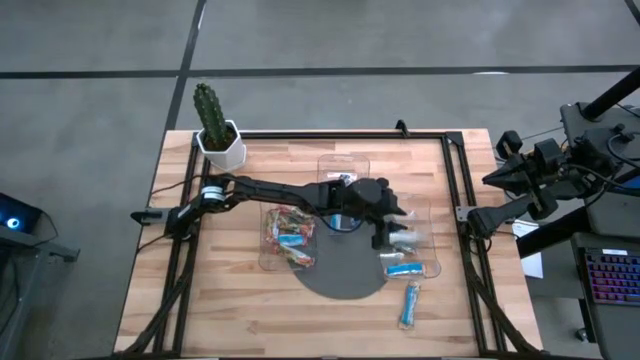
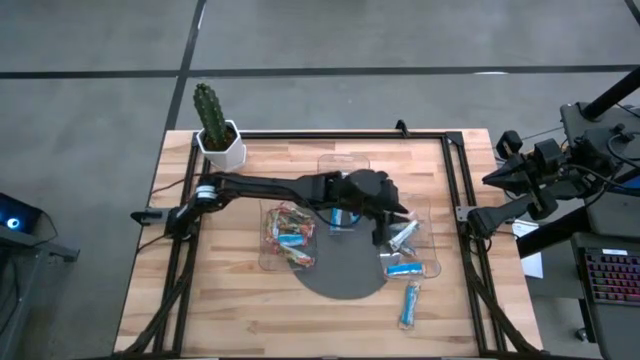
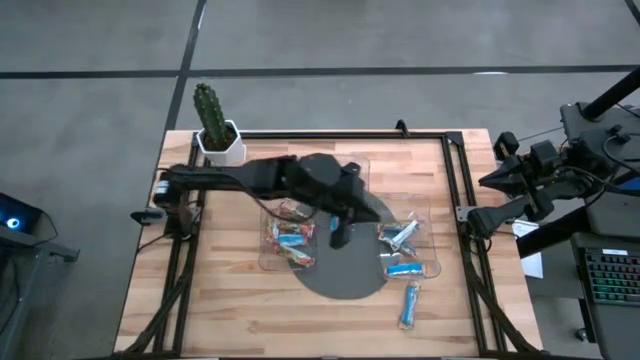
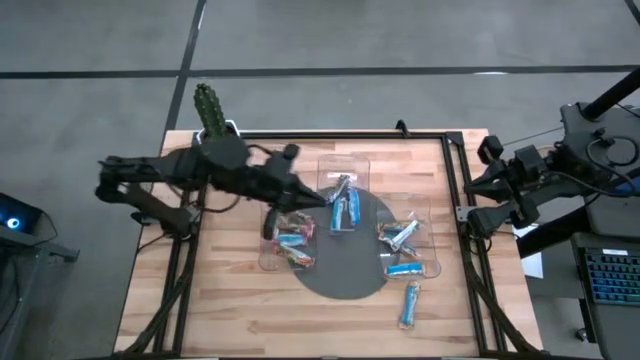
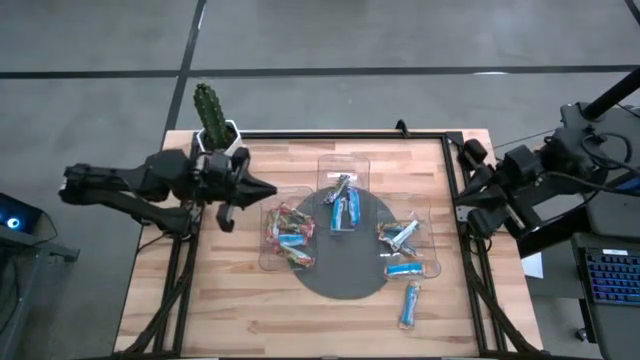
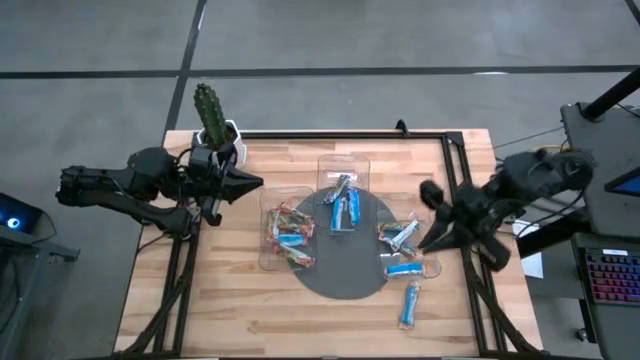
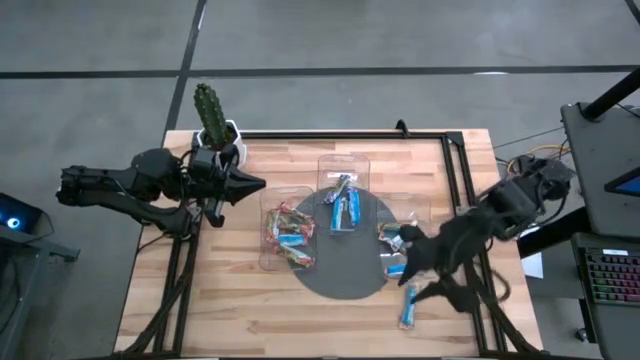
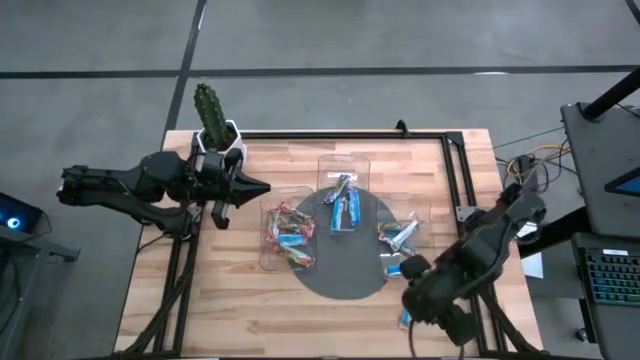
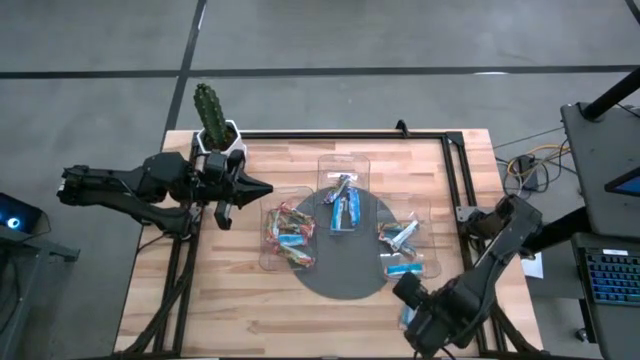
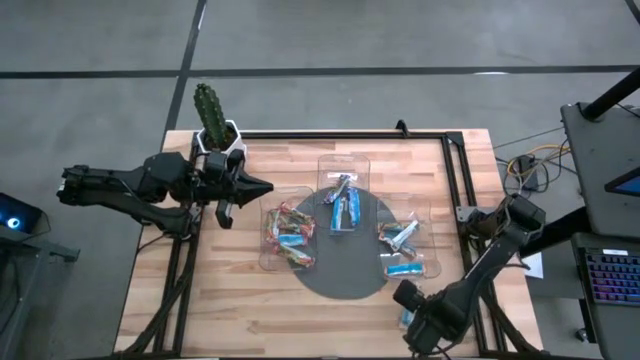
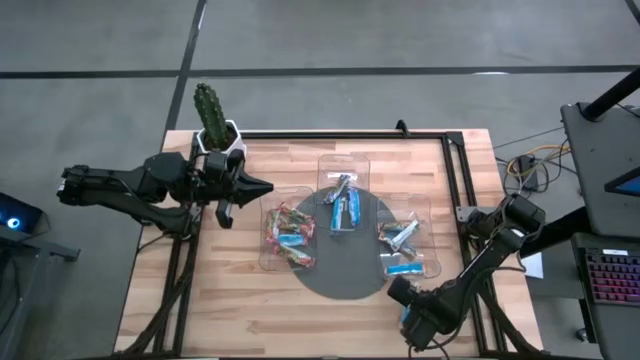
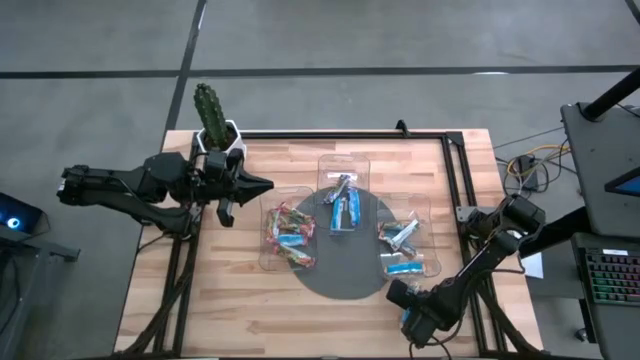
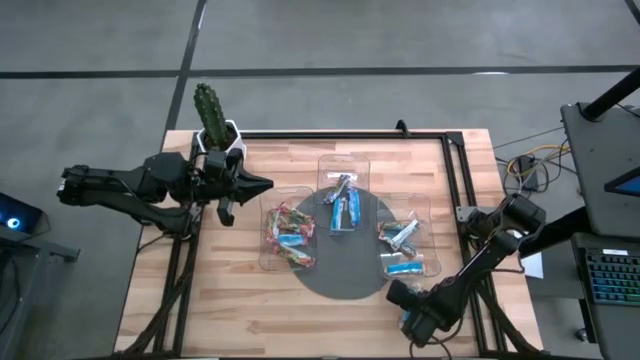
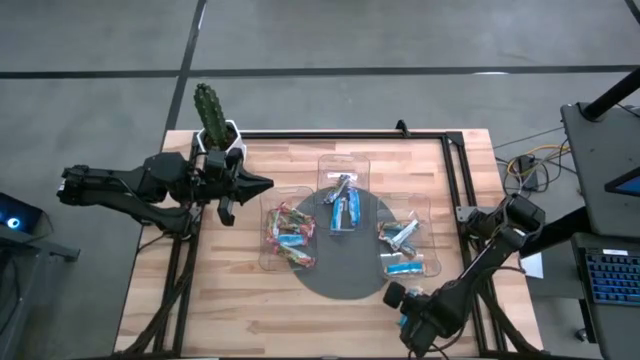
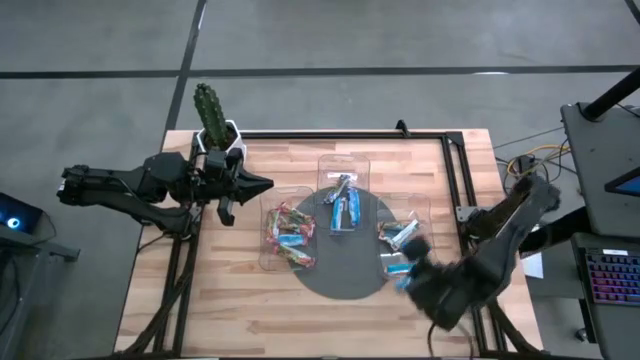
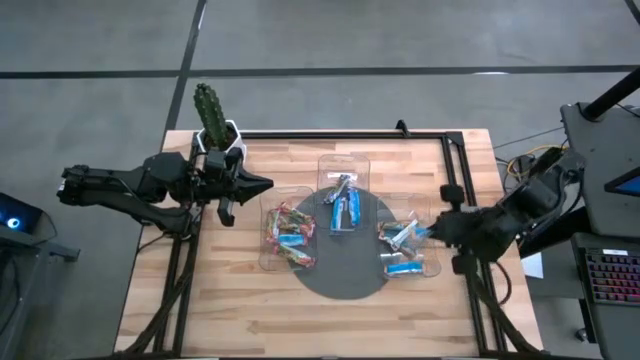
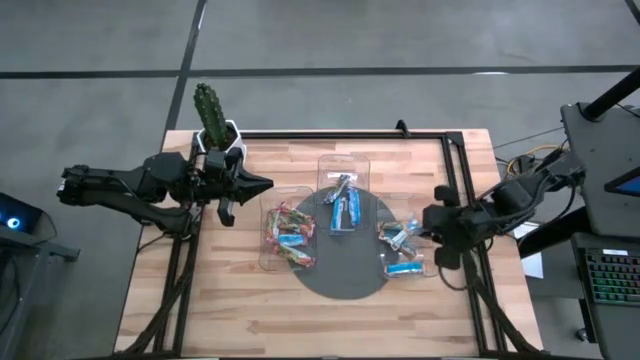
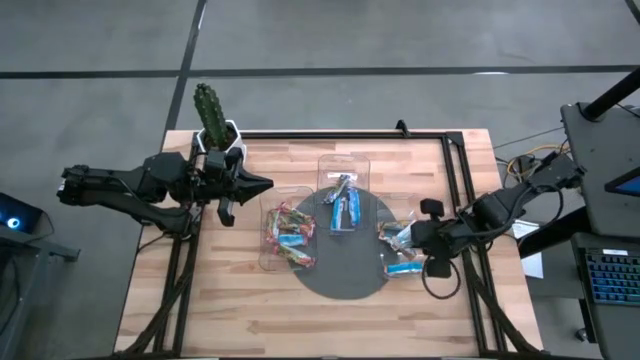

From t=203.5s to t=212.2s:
Task: Pick and place Granola Bars by type
Put the yellow granola bar into the right transparent bin

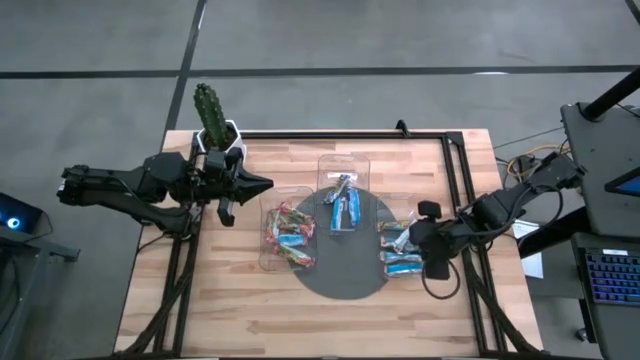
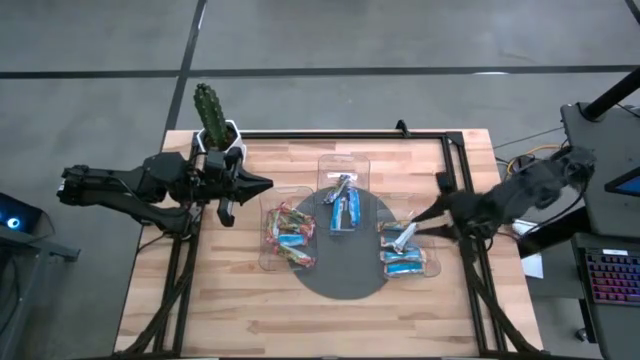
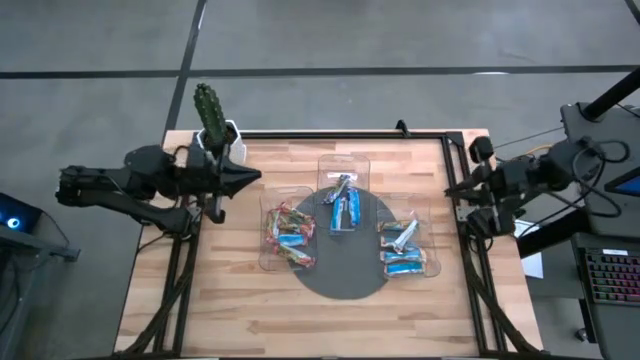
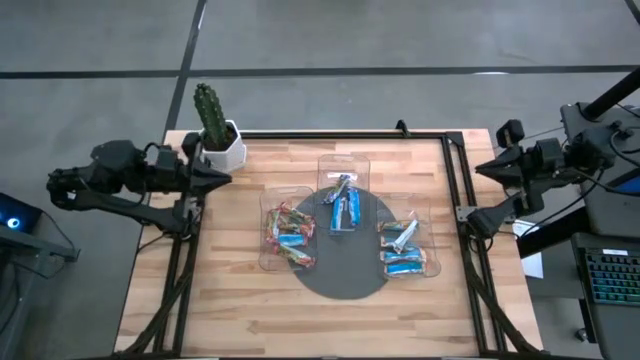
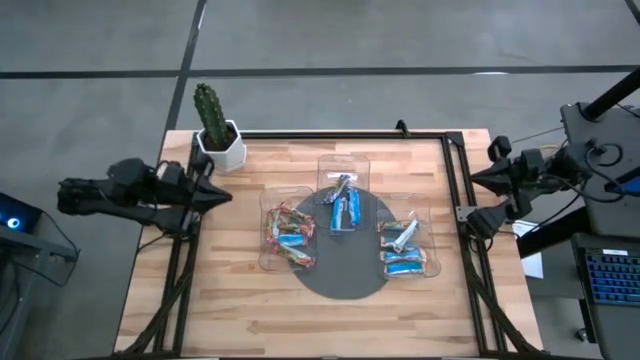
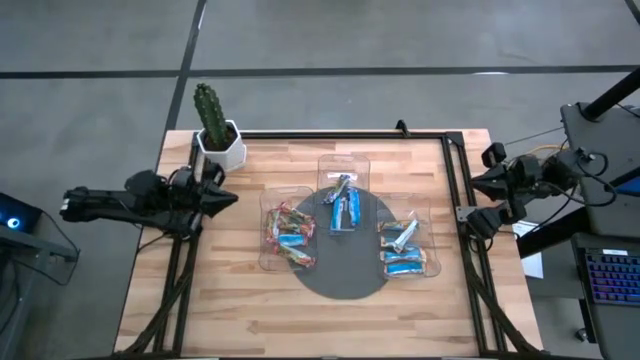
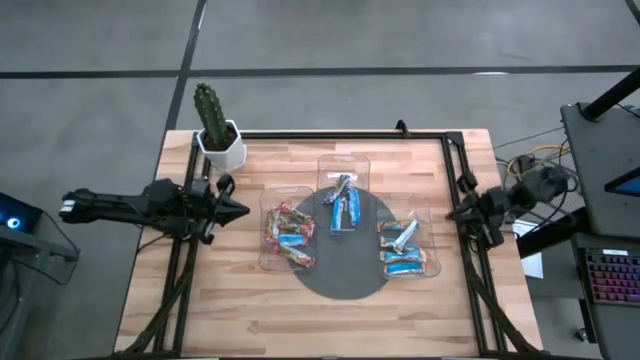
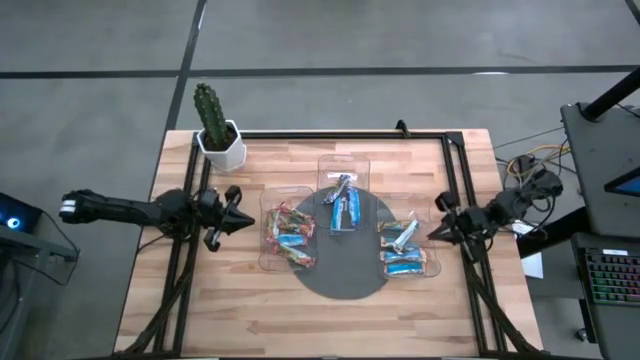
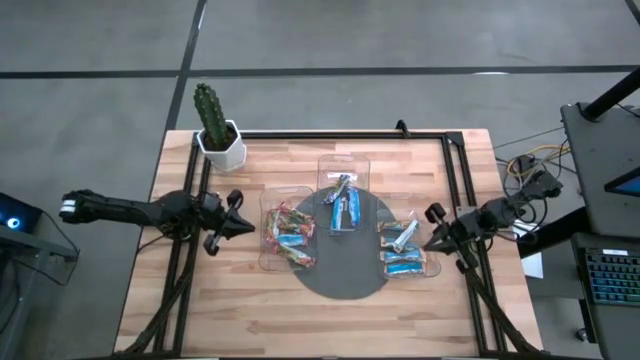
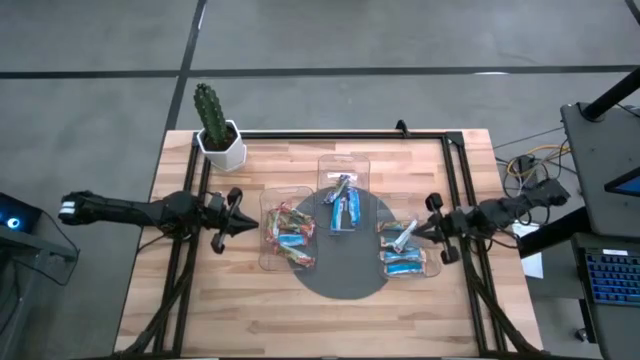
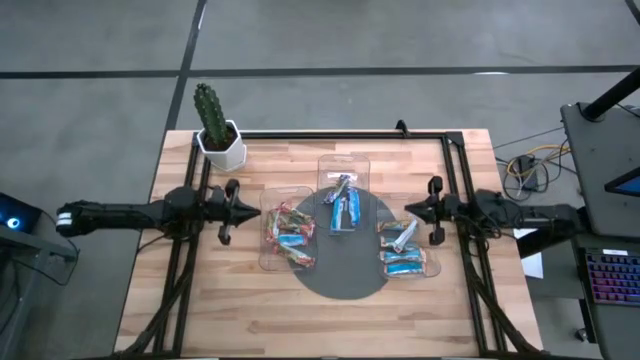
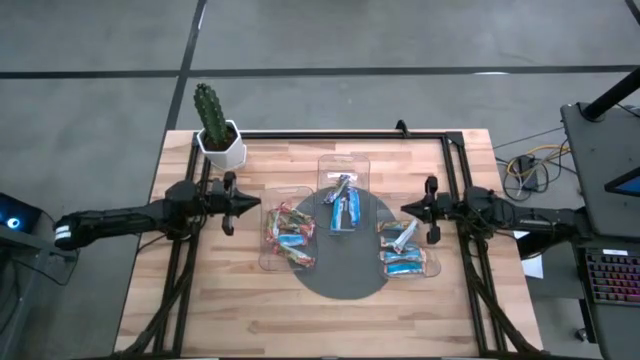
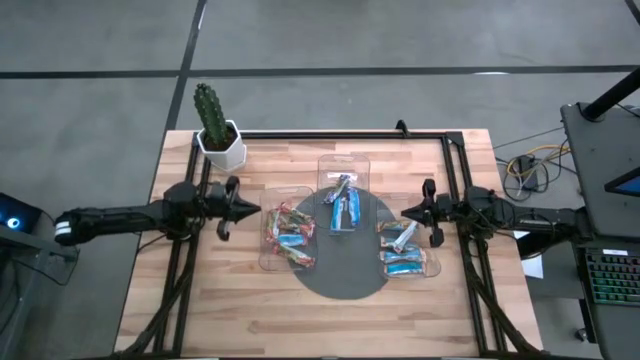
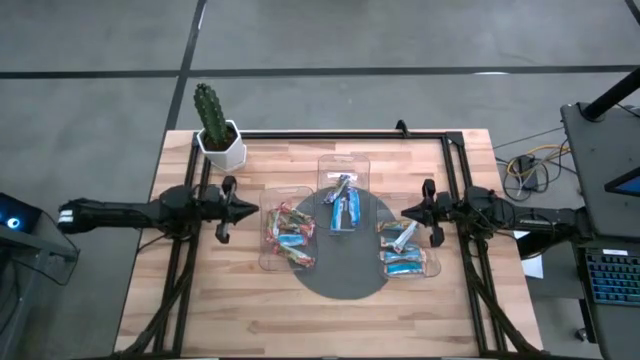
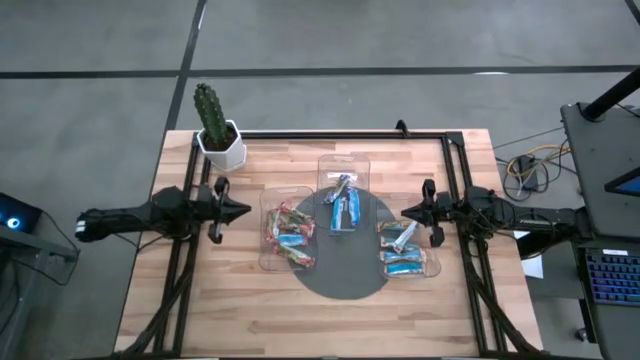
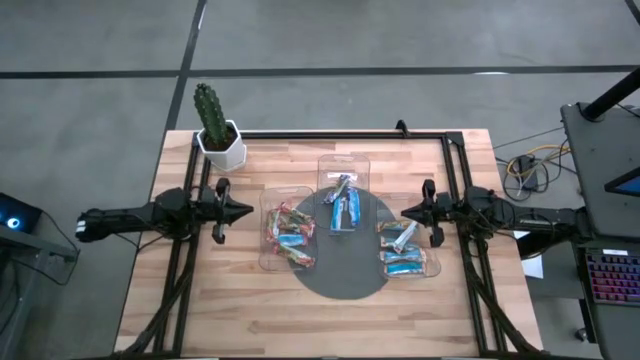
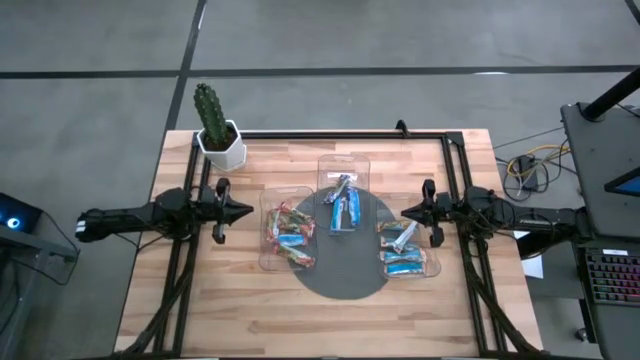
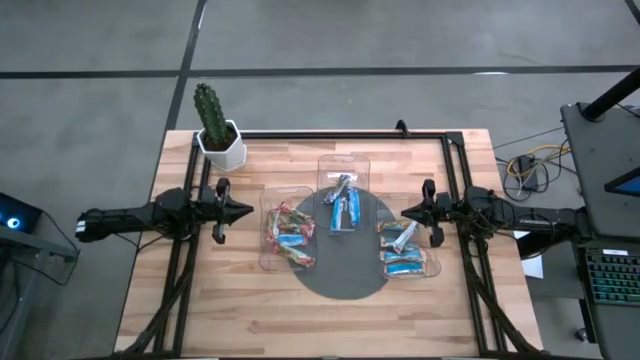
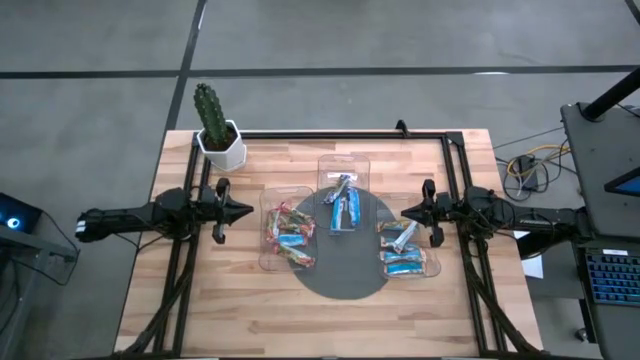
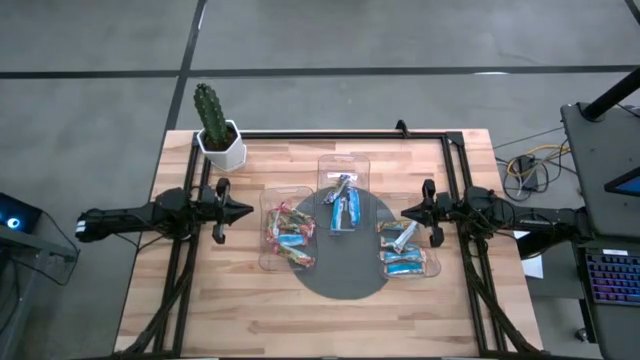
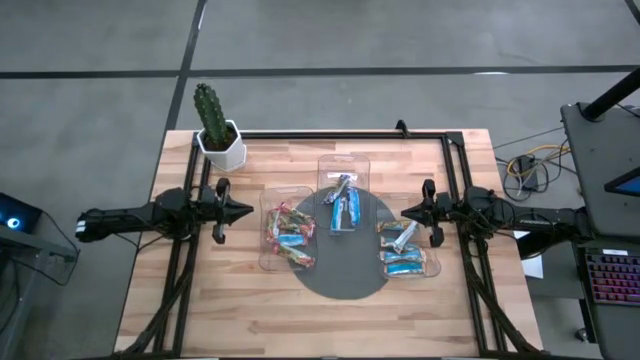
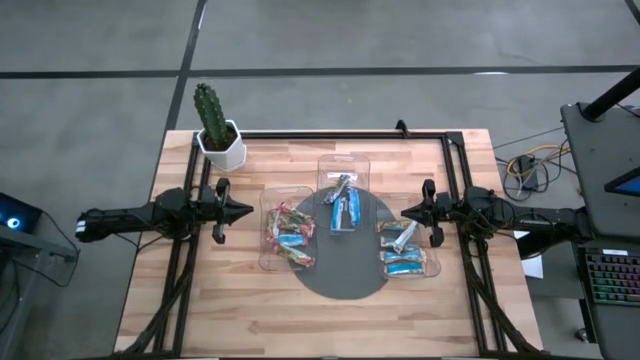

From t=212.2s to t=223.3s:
Return to Home Position
